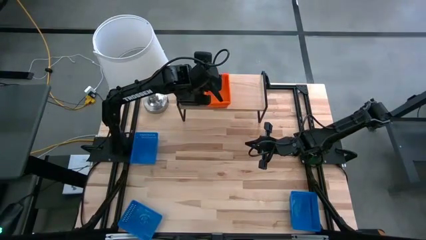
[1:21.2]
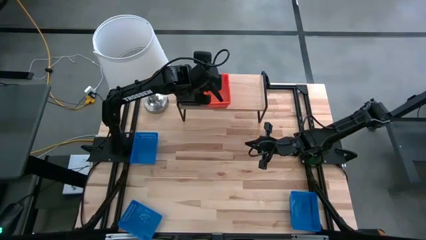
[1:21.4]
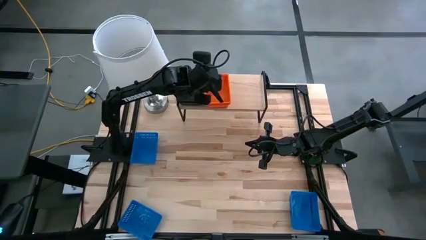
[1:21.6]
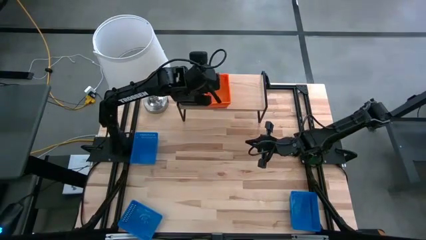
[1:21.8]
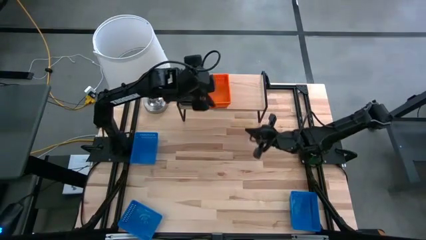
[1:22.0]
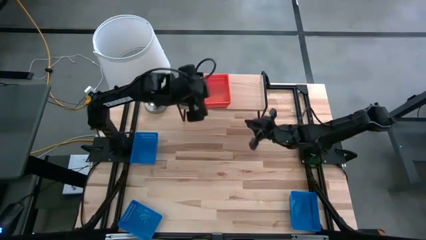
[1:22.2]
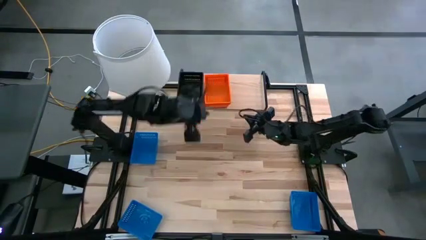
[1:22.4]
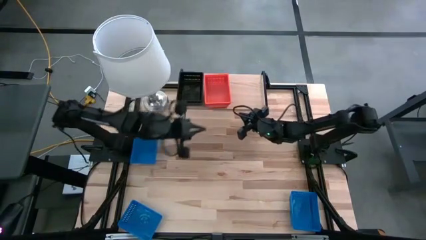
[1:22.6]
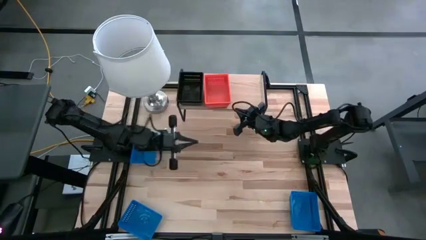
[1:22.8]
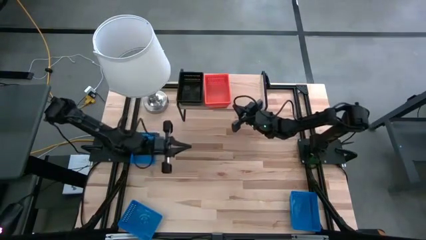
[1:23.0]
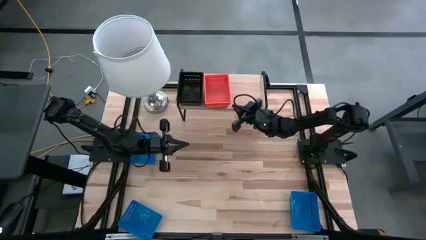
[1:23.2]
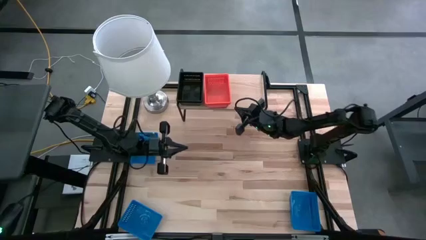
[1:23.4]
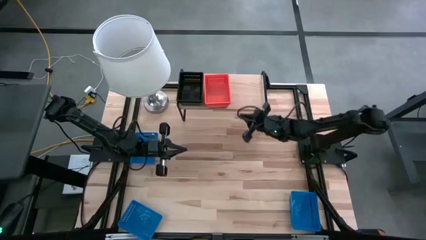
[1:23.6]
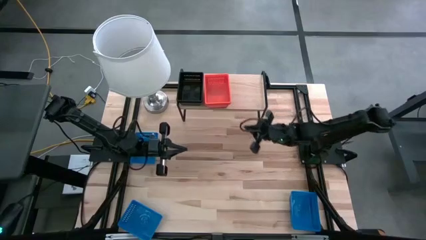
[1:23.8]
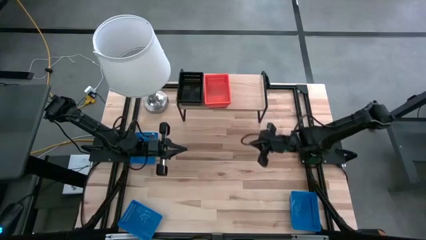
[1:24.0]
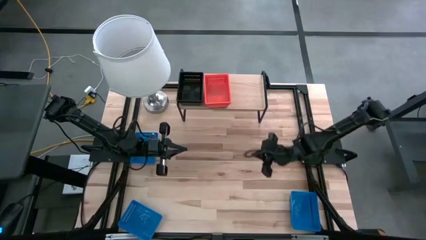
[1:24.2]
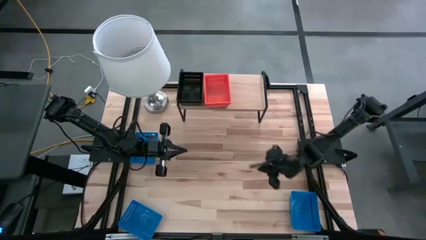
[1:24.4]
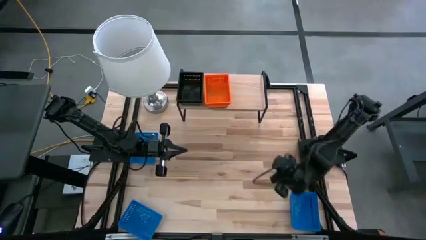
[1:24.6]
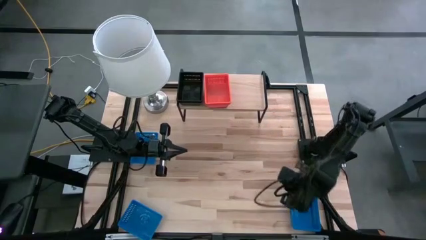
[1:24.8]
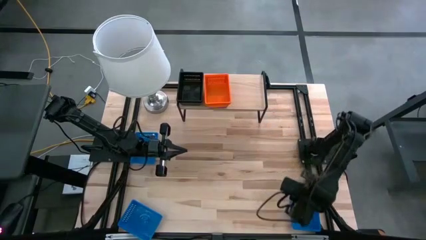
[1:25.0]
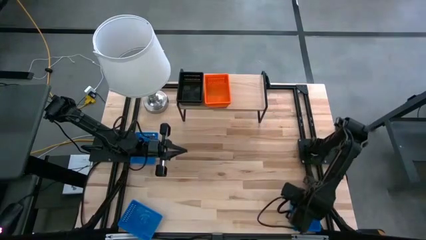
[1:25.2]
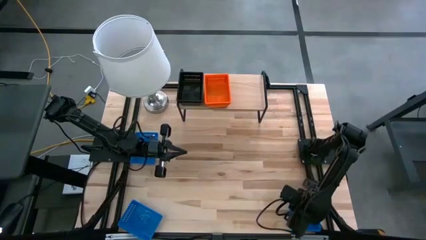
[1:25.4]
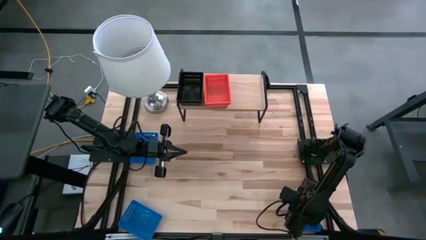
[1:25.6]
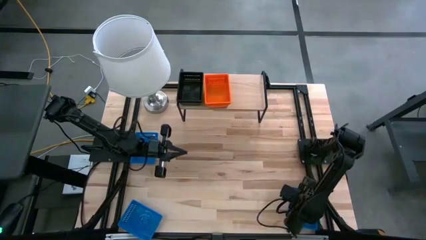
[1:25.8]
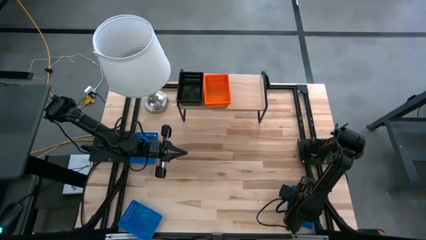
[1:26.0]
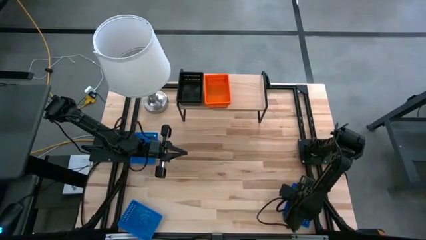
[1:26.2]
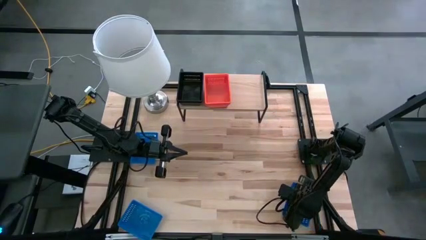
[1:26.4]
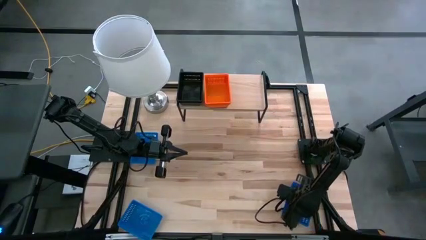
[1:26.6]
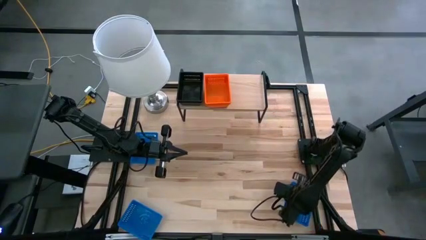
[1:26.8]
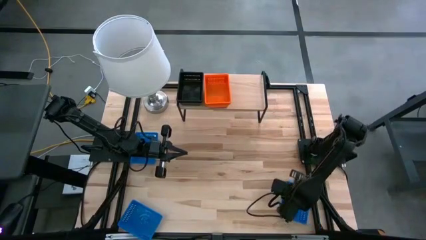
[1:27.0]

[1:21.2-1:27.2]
Task: Stack baskets on shelf by color
Put the bottom right blue bin on the shelf

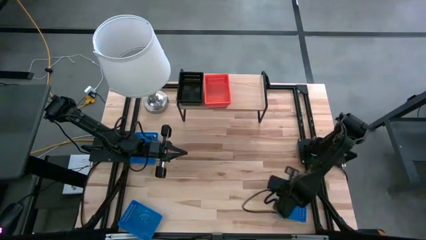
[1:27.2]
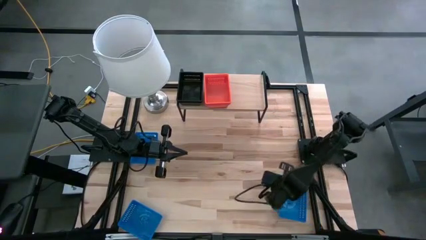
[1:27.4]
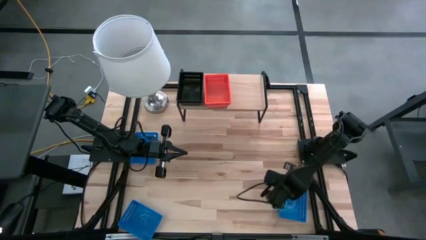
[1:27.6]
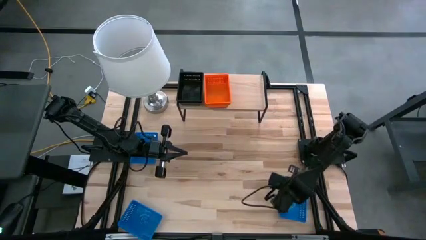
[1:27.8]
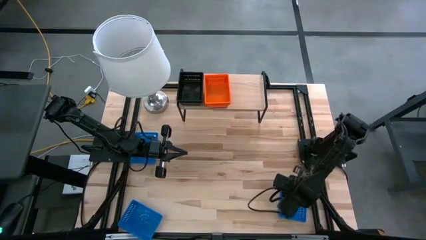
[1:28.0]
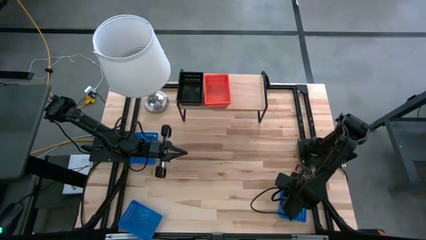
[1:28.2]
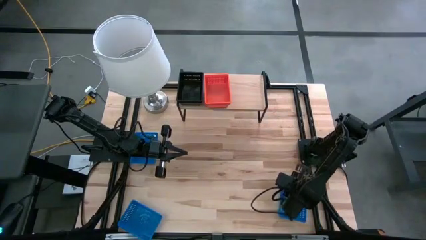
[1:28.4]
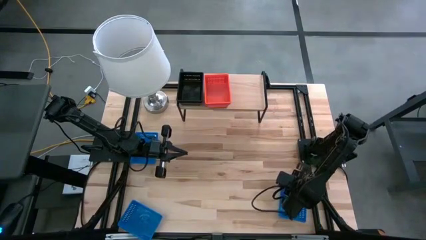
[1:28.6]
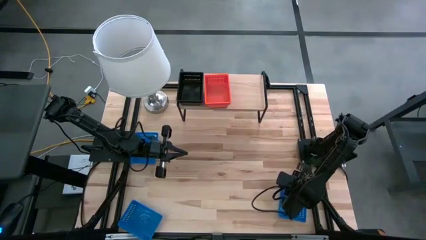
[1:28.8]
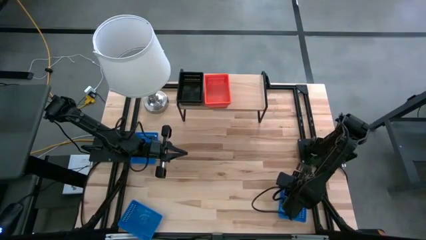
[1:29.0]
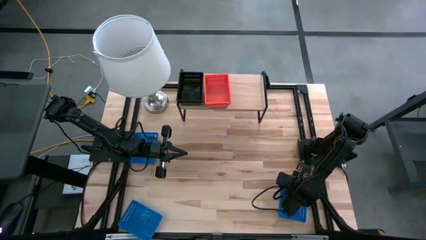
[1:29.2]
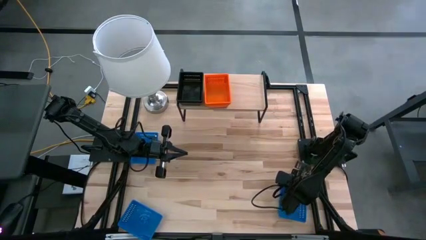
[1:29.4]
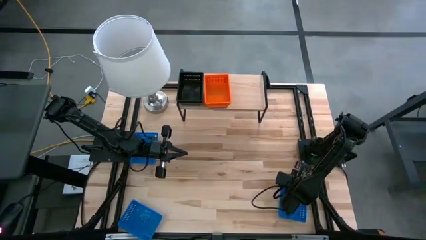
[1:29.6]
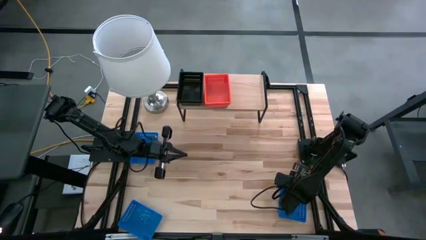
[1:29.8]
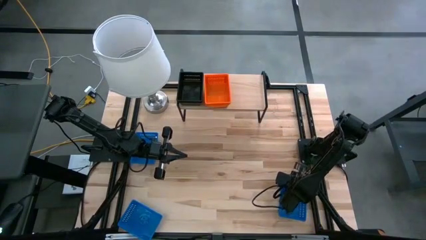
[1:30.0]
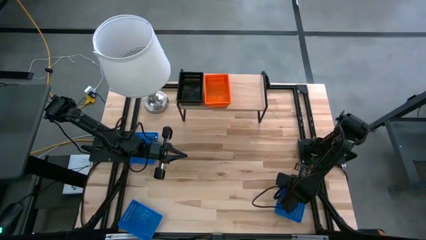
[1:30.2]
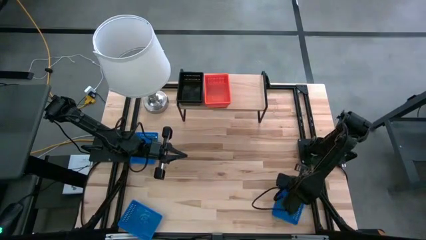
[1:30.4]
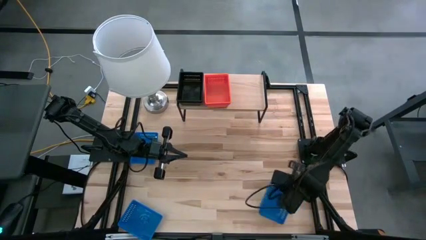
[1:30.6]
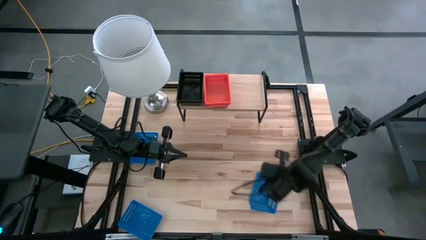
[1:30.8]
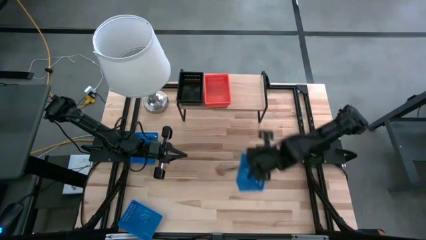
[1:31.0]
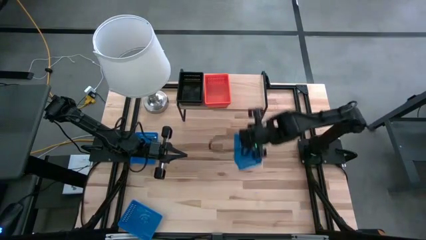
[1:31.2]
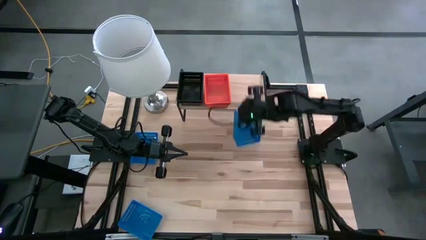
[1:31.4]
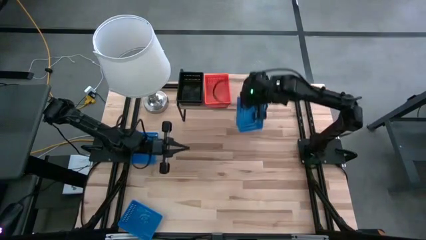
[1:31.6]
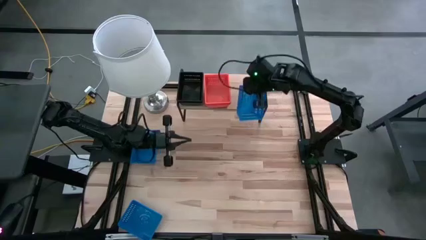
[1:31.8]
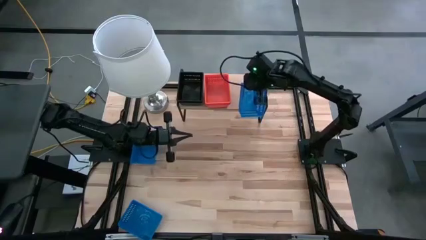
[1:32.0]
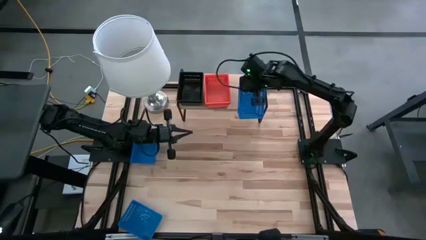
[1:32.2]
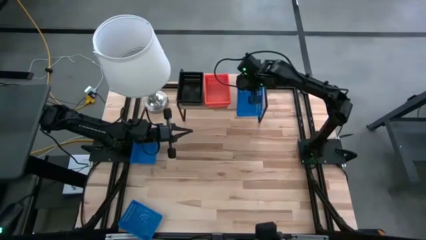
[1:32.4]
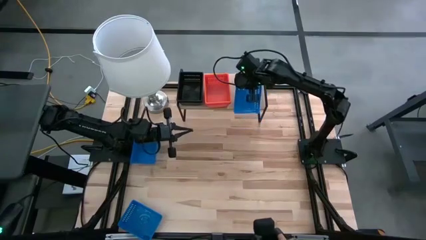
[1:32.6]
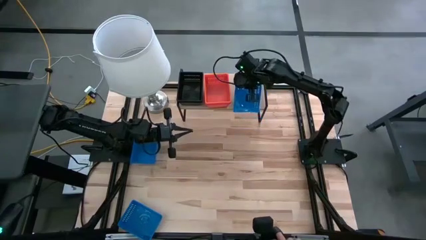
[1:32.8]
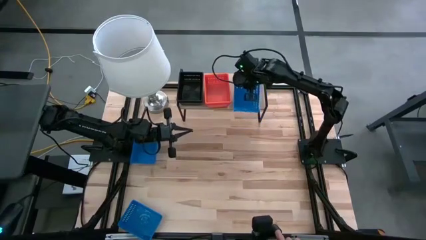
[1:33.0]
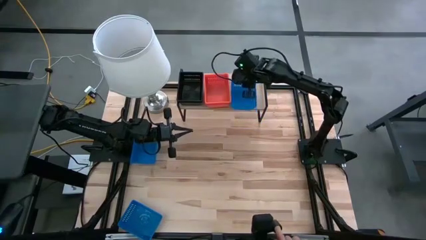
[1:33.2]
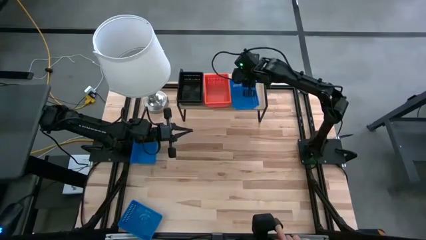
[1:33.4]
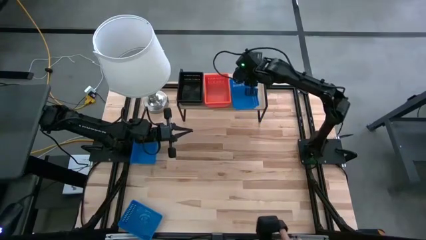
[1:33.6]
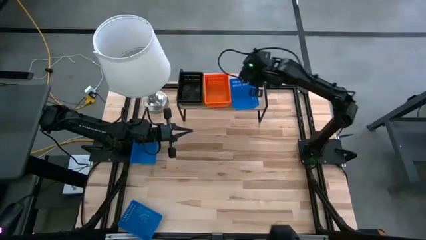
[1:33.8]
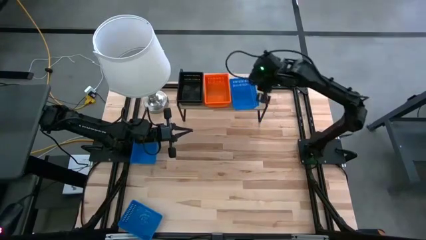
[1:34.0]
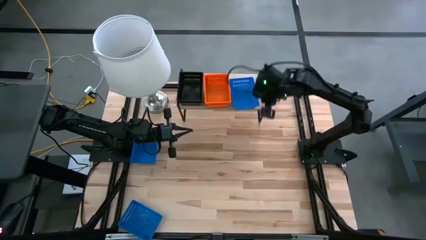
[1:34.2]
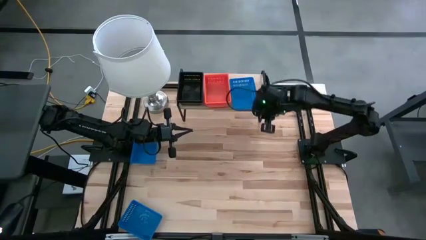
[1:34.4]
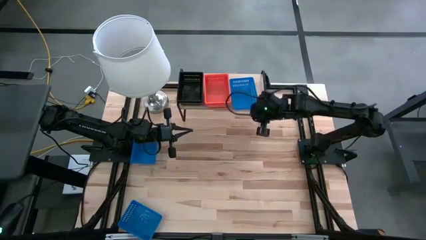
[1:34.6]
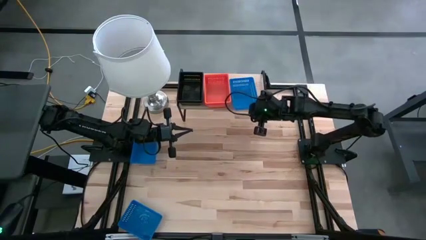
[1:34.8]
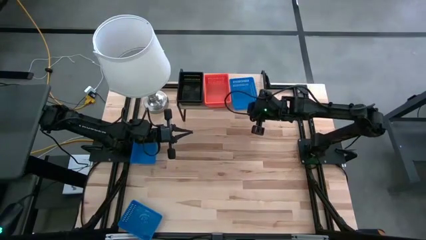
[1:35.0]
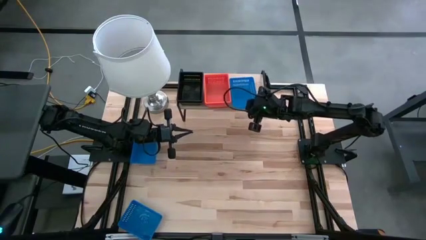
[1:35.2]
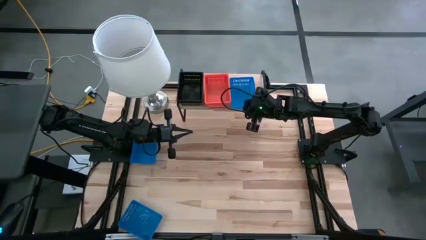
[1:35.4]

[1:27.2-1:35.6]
Put the bottom right blue bin on the shelf

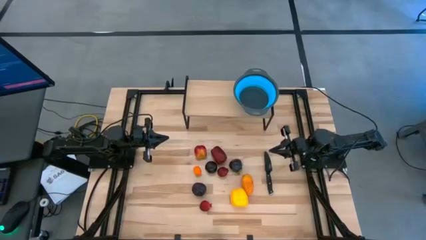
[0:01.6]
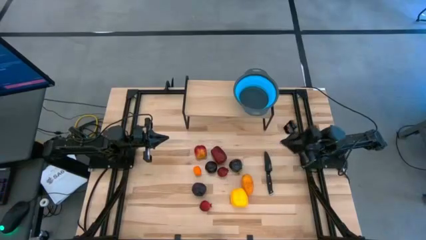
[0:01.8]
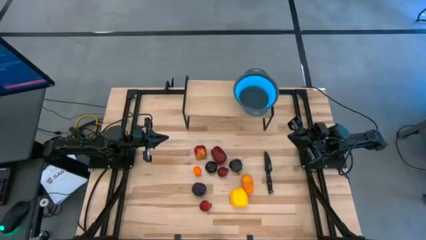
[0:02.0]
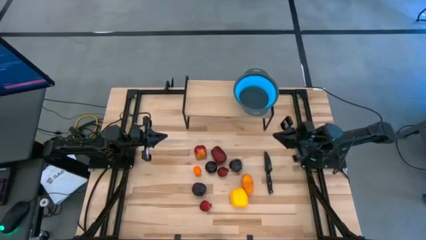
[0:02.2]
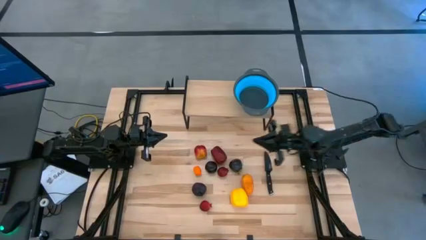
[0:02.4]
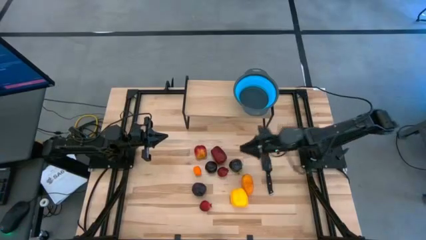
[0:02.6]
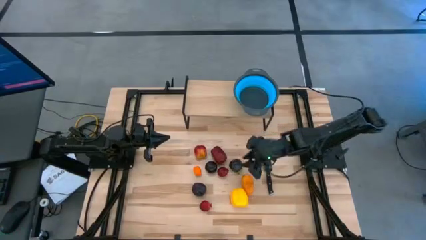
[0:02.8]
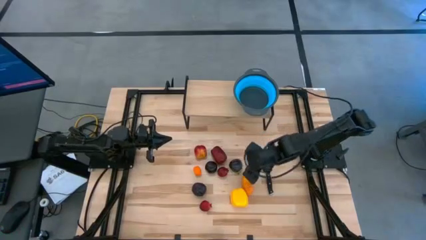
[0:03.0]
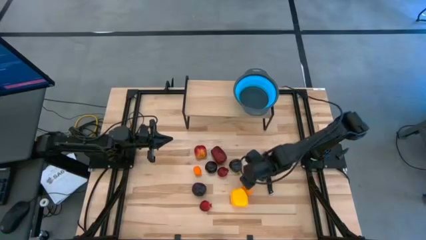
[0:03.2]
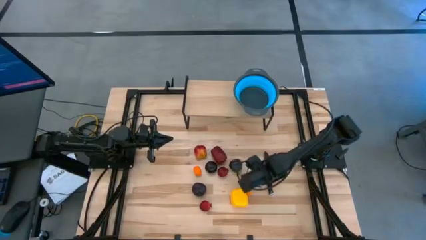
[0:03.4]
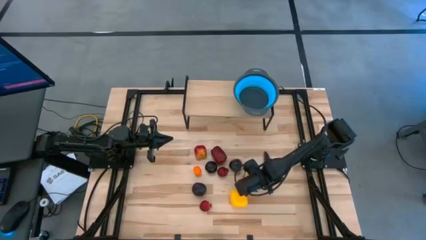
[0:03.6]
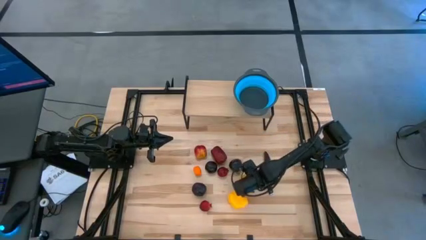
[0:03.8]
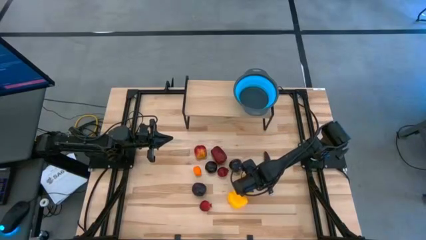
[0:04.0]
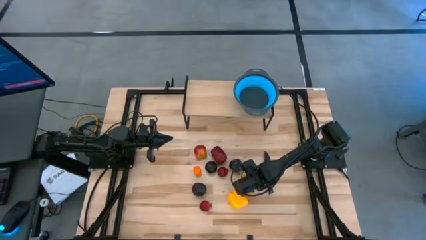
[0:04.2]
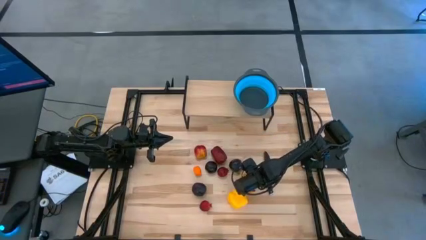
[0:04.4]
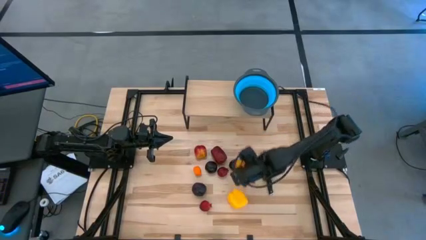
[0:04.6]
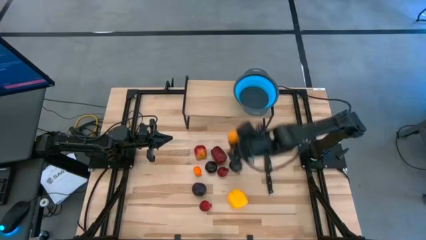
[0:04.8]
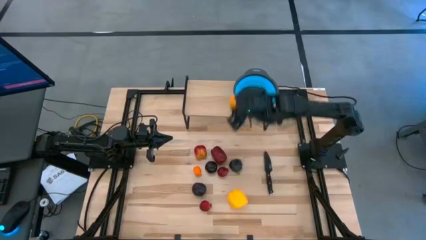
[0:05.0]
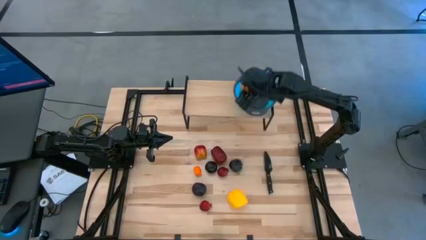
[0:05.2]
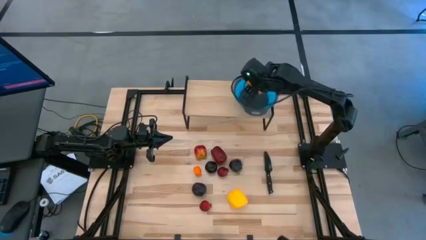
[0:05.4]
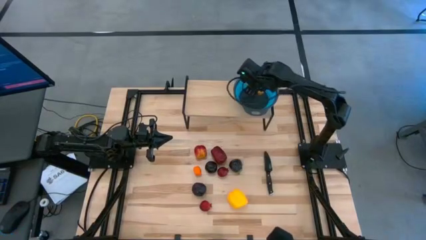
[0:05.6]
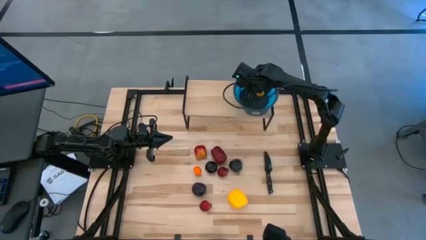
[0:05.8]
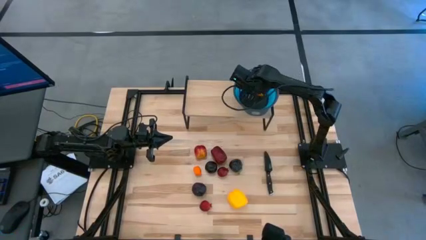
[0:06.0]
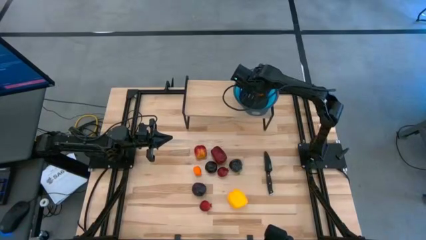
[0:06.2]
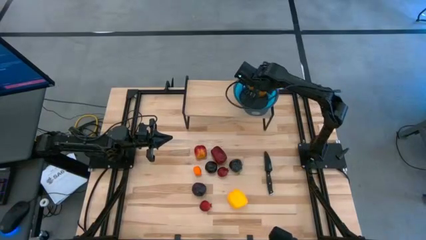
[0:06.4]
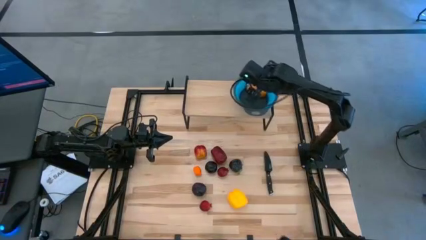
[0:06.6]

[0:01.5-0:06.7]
Task: Pick & Place Fruit
Put the yellow mango into the strainer bowl
